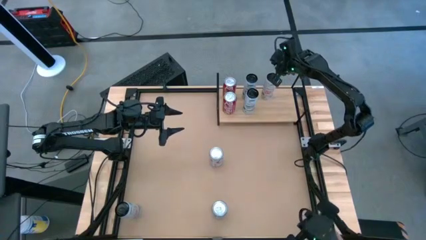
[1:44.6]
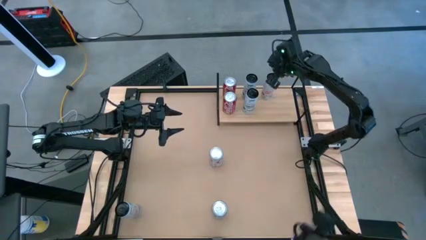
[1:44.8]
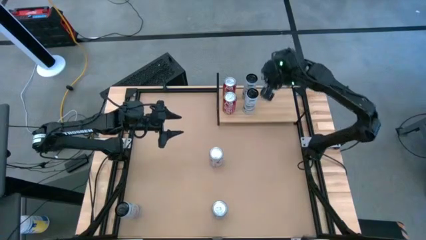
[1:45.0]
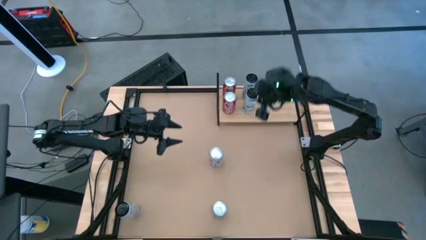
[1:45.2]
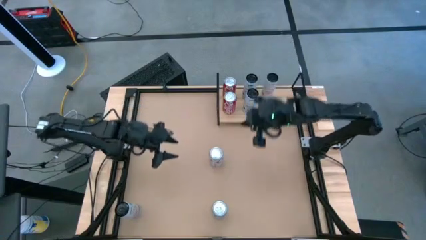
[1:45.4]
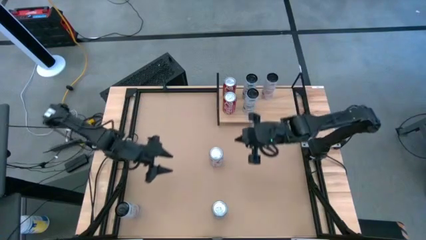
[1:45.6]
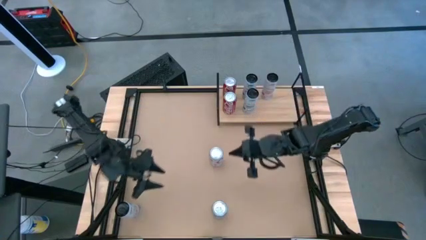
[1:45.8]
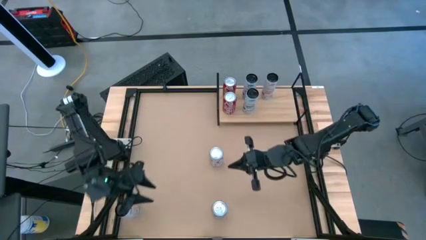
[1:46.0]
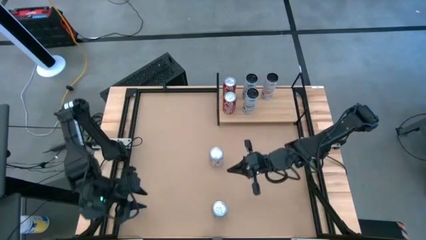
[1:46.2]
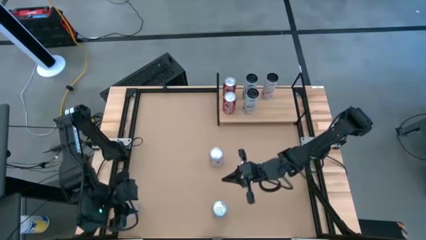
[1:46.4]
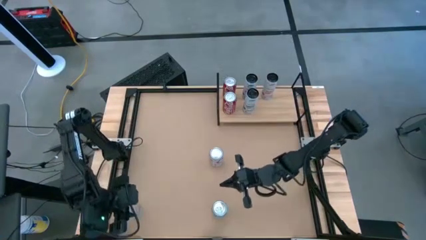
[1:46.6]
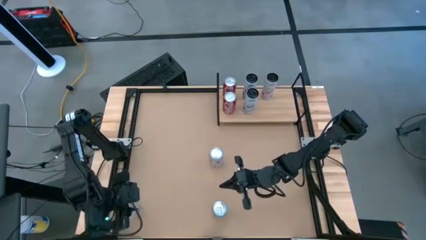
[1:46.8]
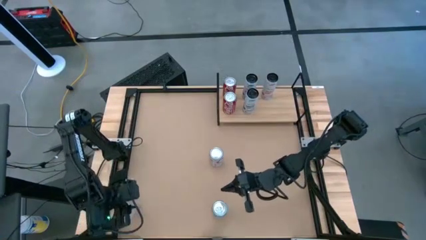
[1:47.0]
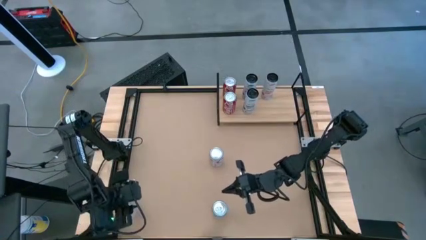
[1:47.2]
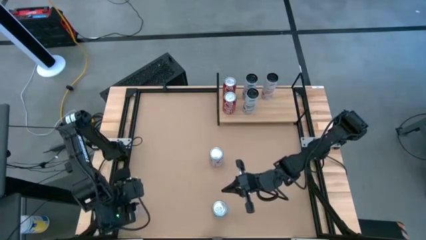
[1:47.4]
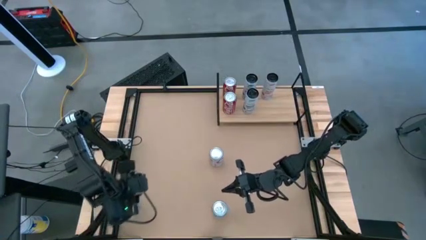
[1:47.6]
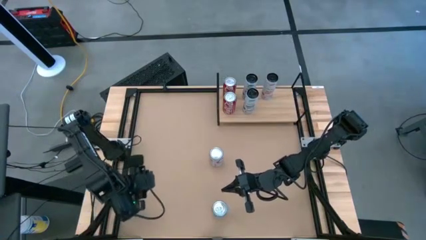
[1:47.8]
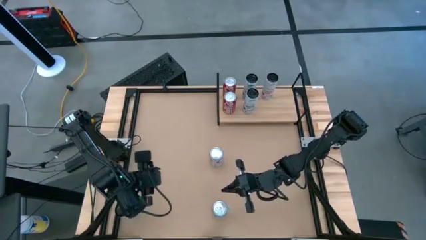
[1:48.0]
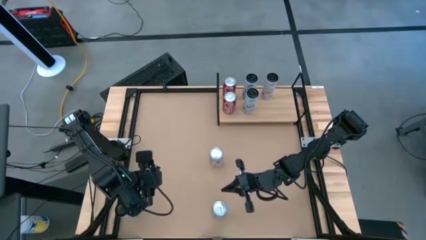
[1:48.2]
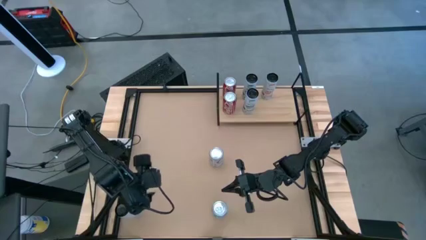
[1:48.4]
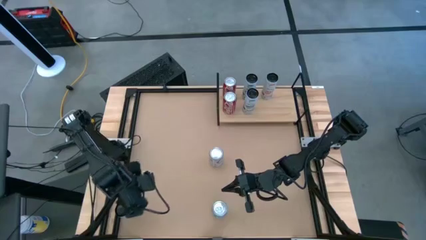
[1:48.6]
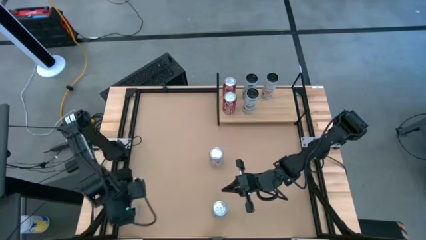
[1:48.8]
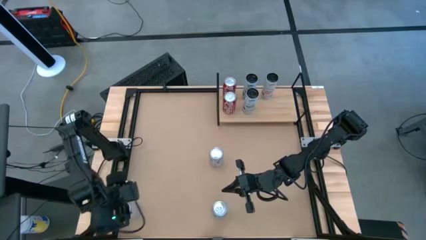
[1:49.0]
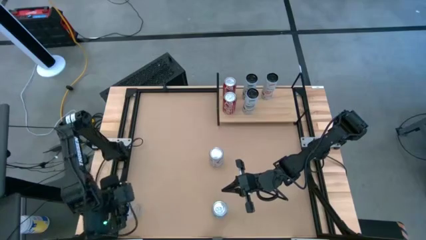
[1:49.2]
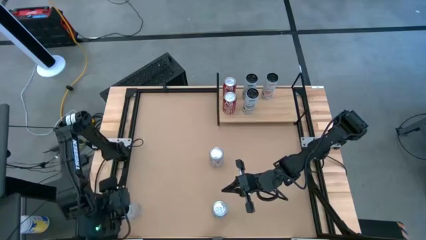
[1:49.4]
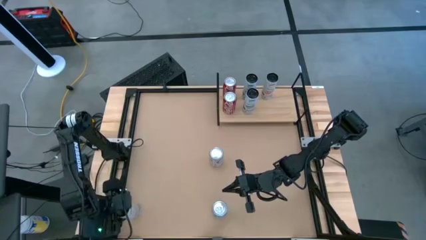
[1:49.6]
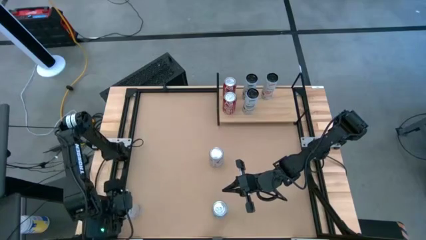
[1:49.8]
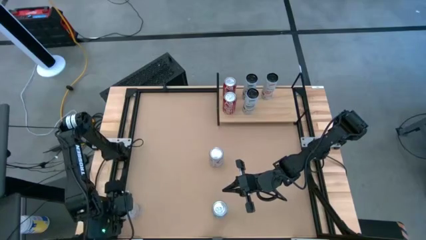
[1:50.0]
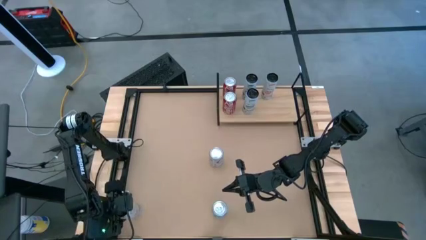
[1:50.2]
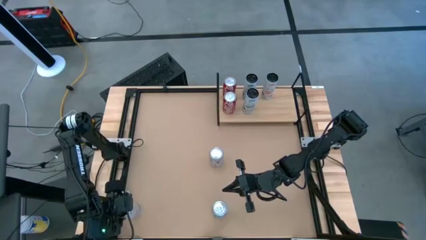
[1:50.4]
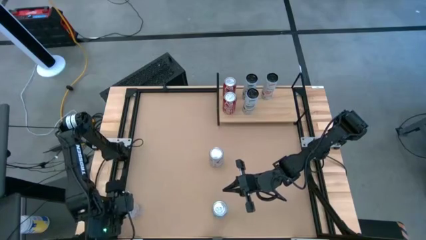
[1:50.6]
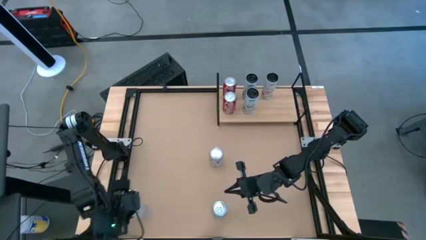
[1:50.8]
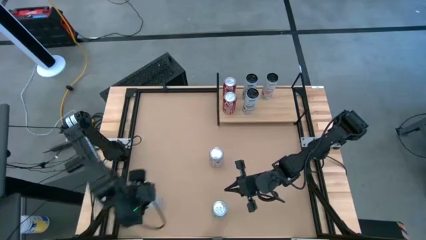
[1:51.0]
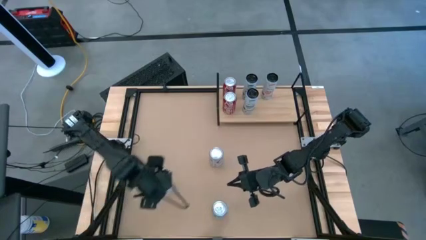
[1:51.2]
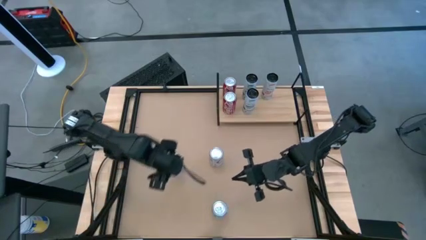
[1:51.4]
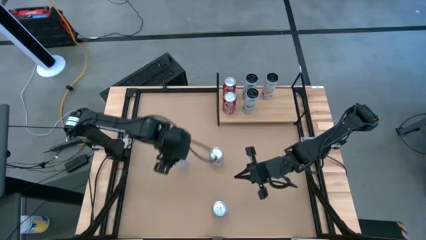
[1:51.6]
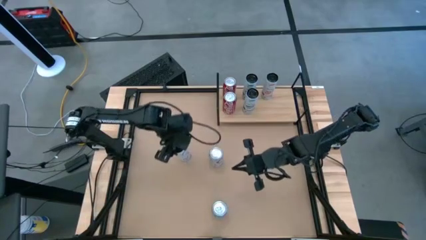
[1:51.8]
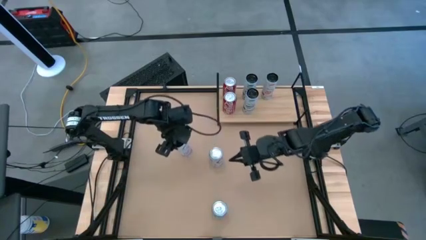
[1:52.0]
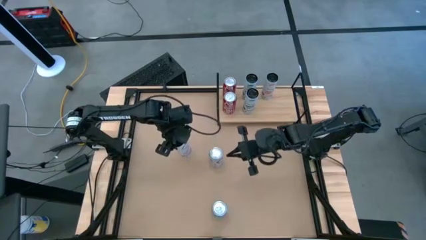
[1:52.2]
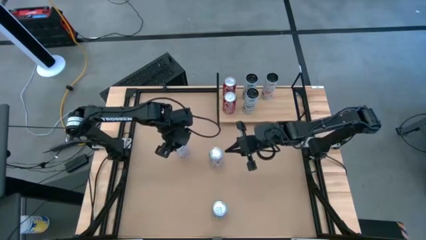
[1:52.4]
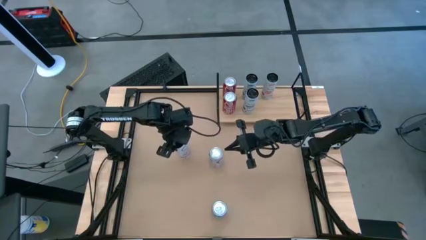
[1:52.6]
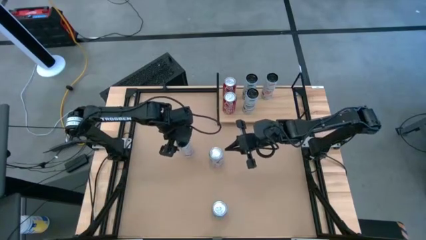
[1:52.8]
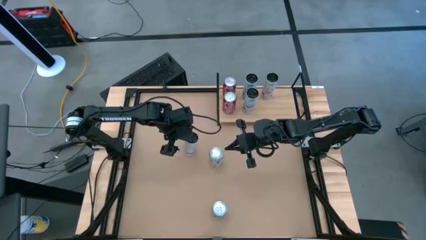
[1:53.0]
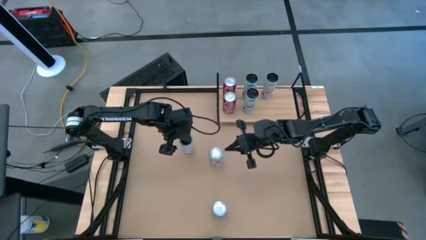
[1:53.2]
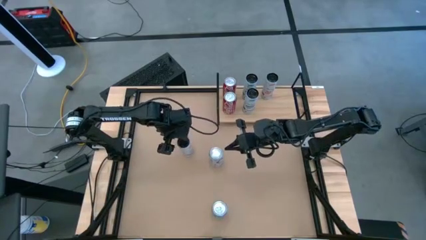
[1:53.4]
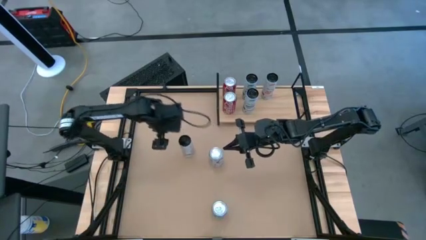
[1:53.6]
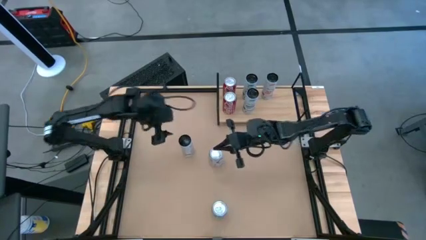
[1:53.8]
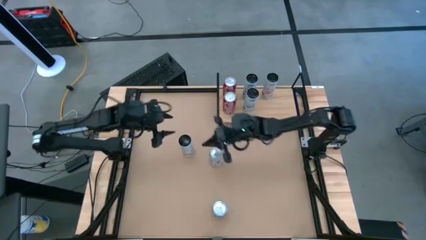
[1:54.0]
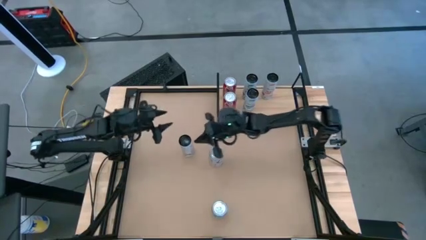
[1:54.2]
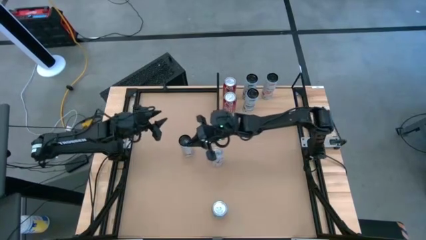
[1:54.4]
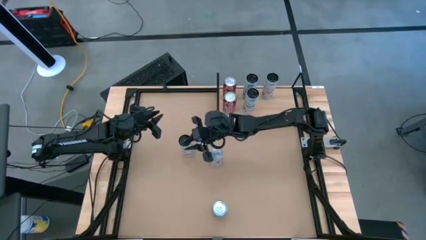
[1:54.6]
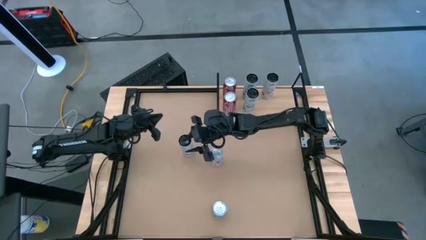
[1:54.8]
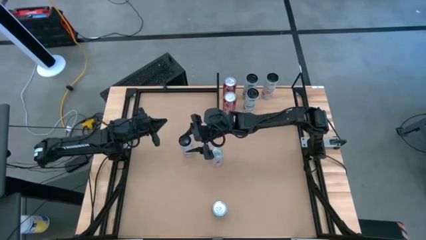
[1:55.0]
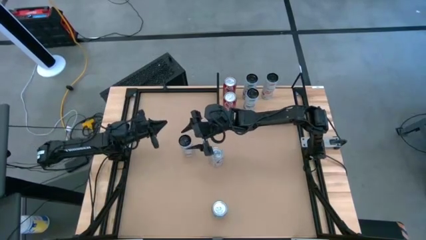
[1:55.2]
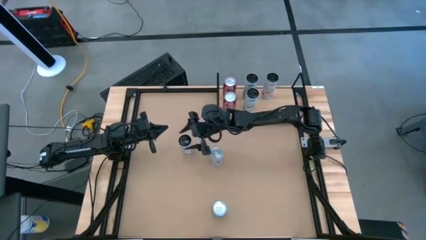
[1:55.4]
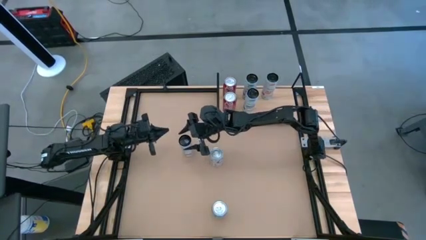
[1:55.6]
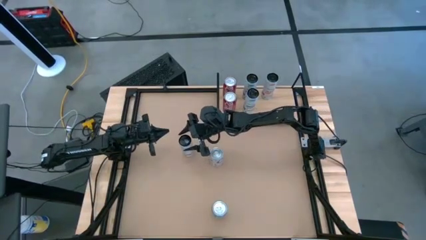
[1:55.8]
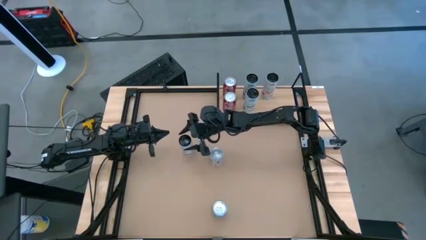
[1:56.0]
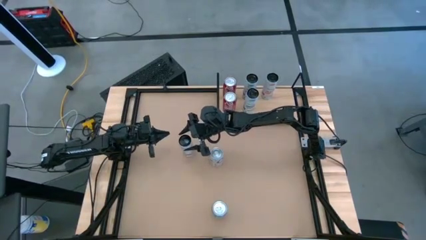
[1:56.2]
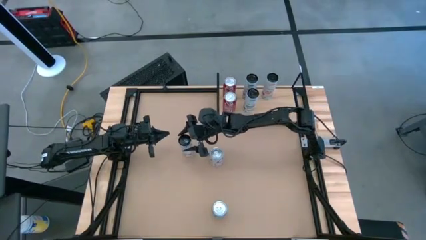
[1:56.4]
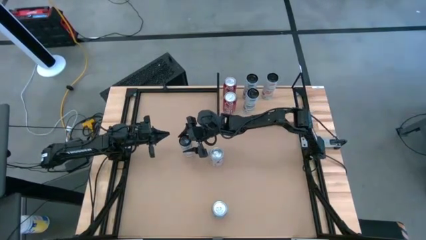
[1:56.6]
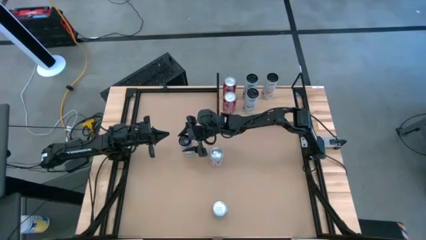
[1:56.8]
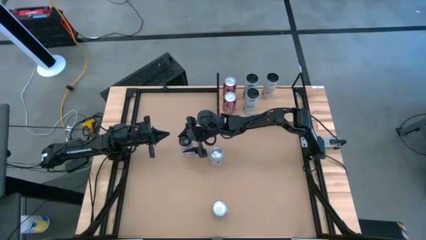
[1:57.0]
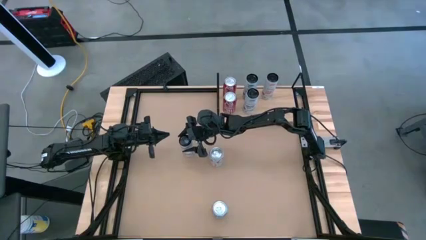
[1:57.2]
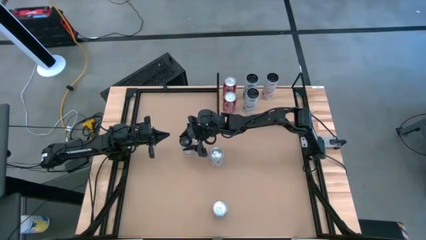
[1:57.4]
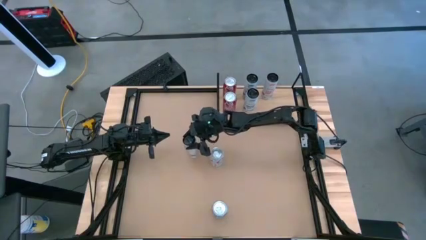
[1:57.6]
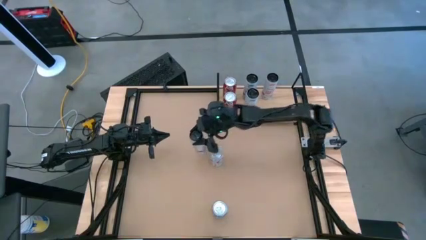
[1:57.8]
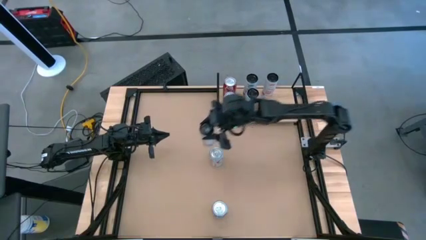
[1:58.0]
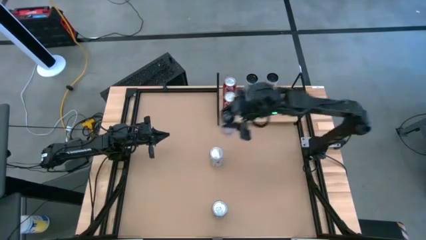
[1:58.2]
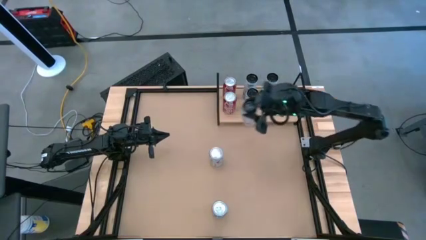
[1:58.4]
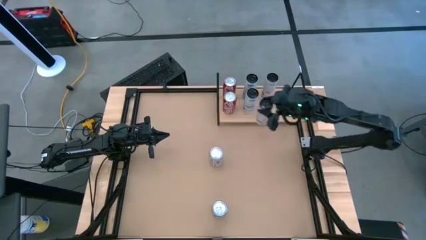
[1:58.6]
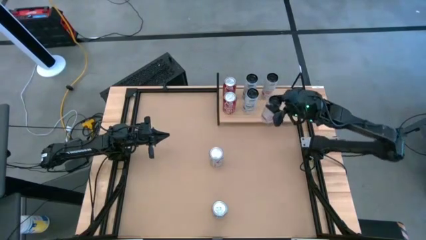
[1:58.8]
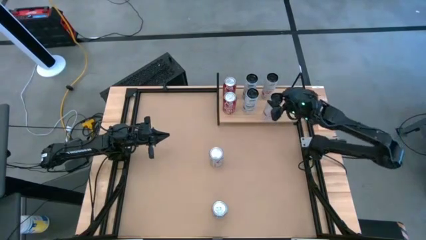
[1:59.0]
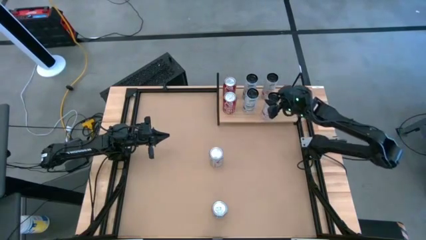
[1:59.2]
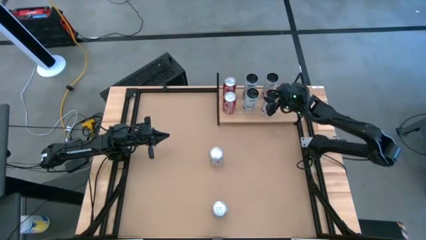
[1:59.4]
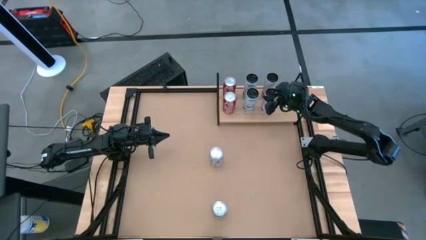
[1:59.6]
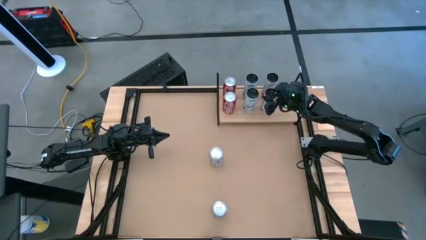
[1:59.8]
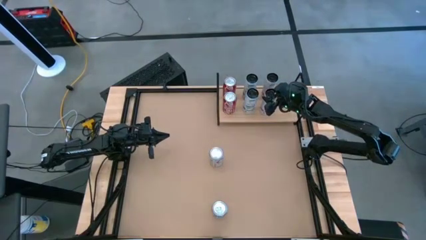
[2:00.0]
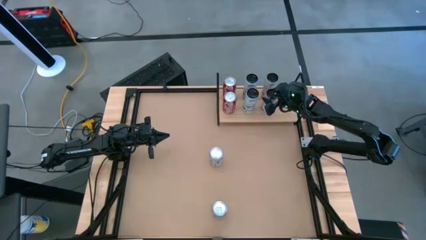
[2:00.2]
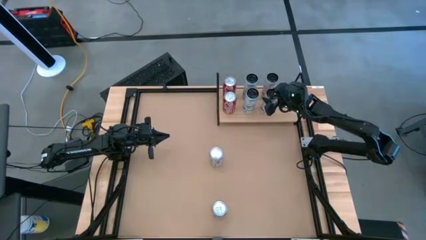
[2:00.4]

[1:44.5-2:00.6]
Task: Place canned beverage on shelf
Put the bottom left pink soda can on the shelf
